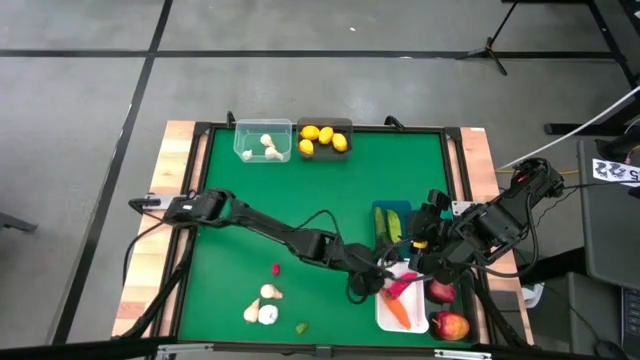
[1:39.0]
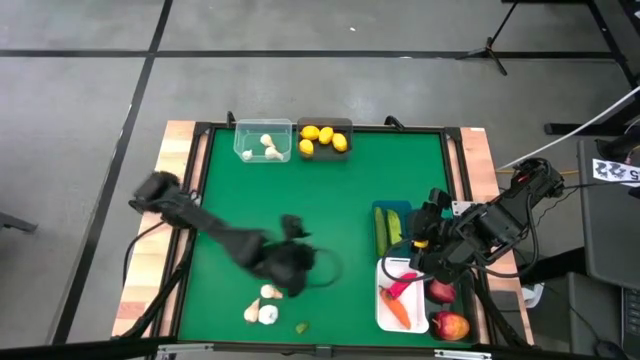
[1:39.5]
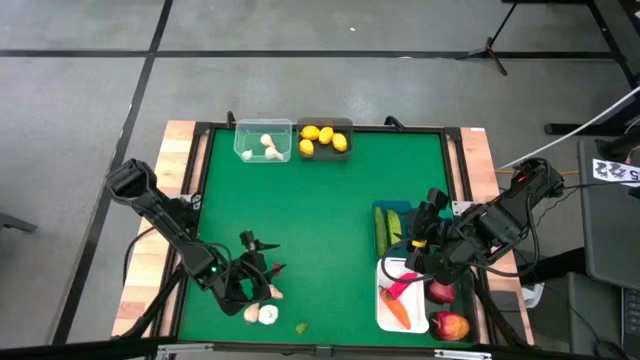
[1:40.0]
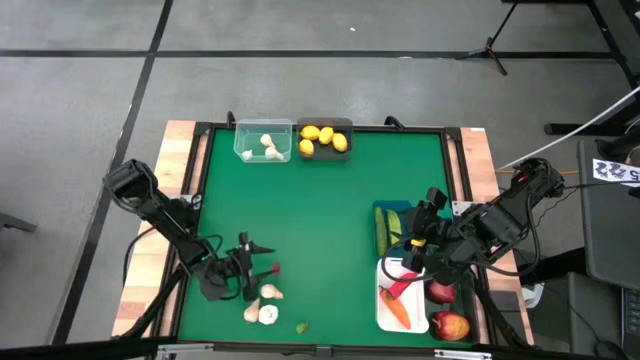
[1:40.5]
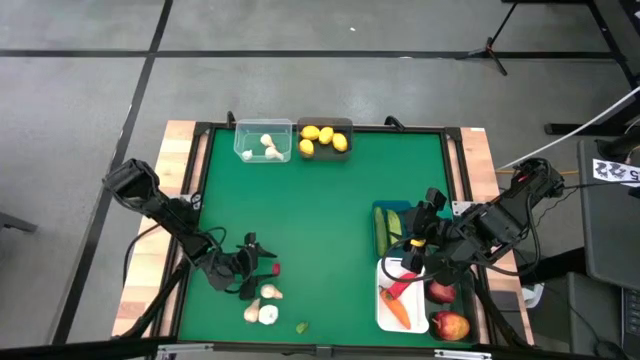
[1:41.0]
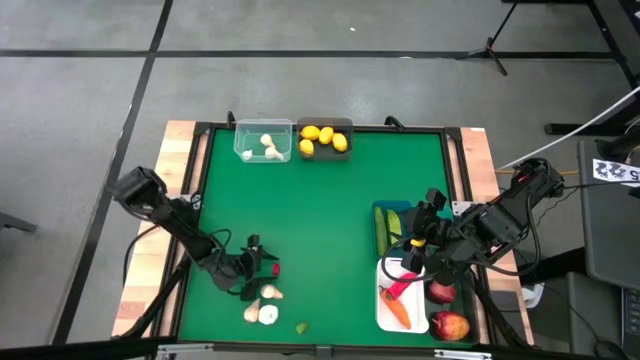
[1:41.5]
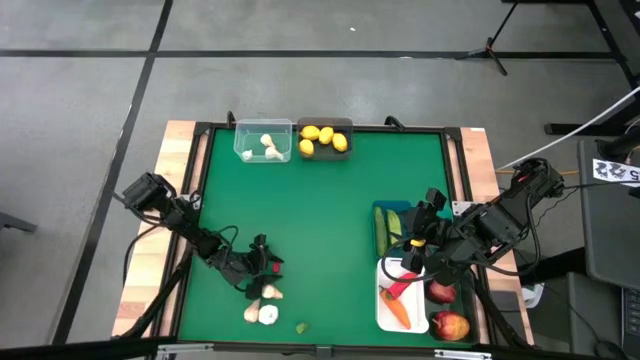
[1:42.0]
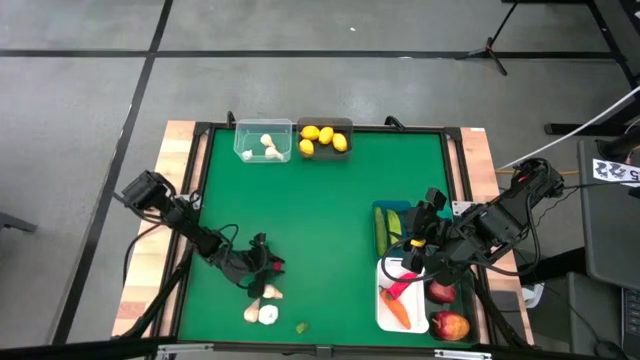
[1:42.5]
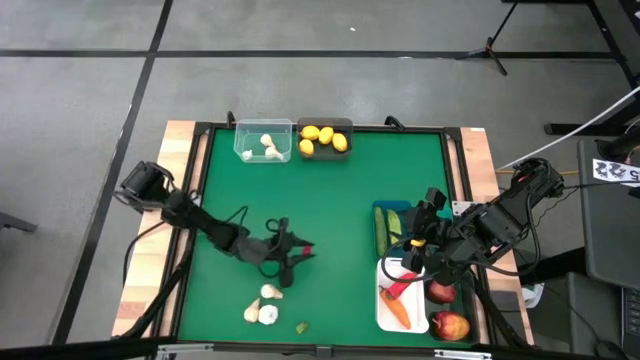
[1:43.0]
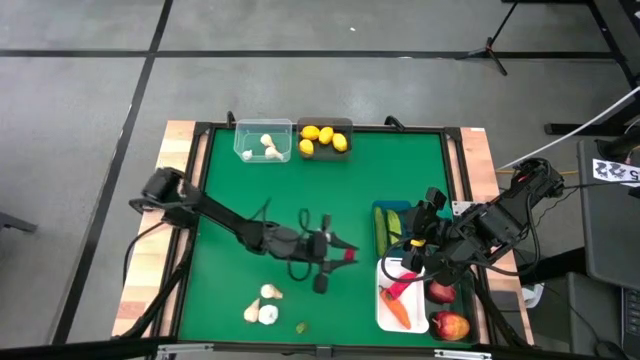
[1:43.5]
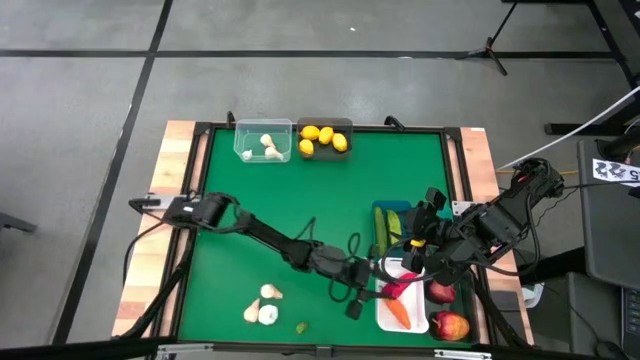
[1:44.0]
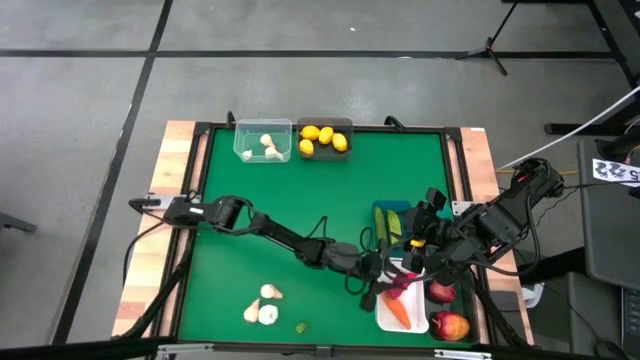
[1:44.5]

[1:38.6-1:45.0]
Task: Sort produce into baskets
Put the red chili pepper into the white bin

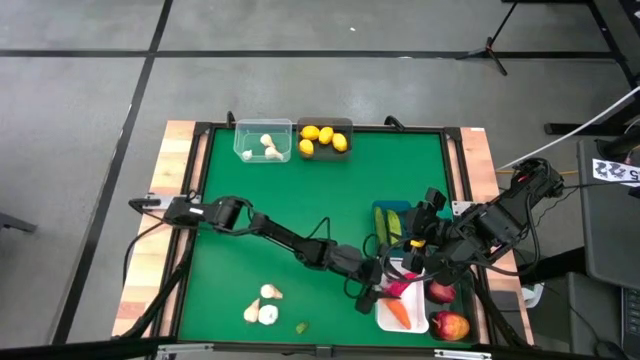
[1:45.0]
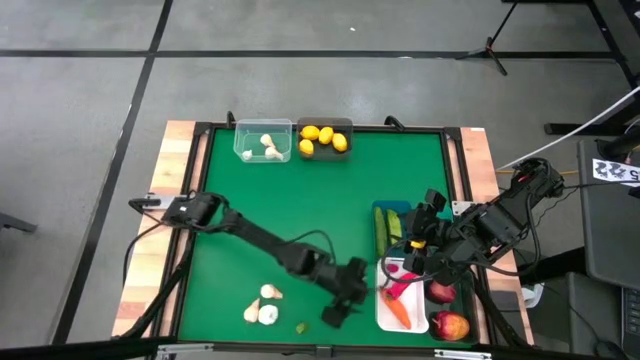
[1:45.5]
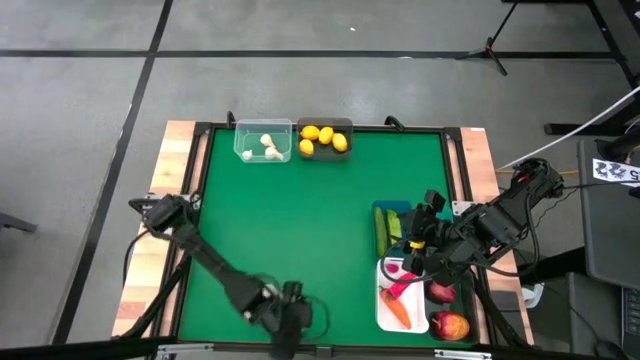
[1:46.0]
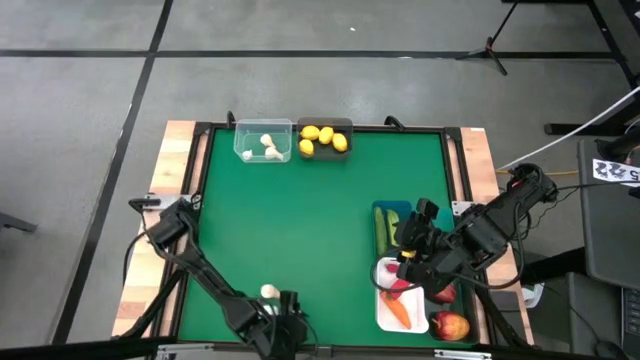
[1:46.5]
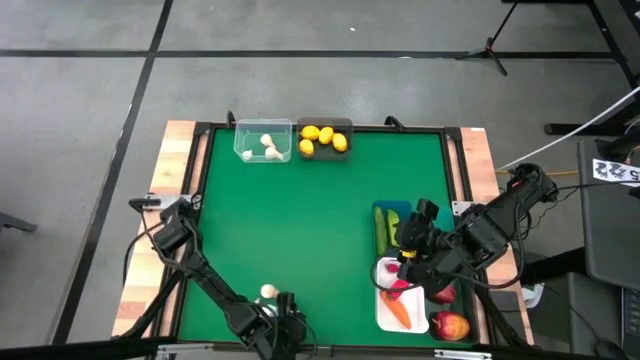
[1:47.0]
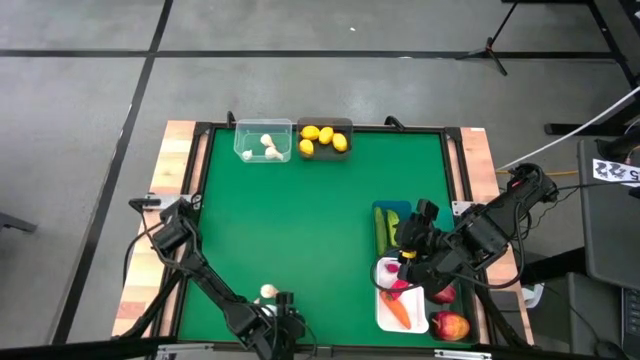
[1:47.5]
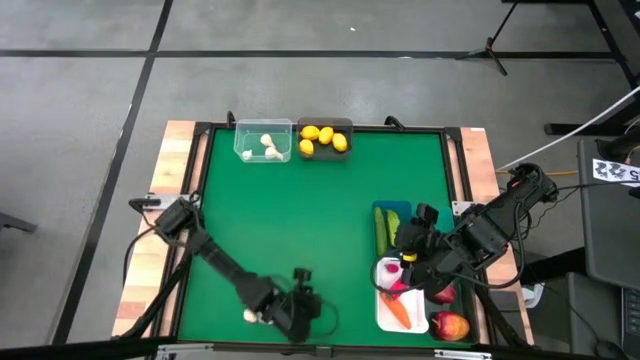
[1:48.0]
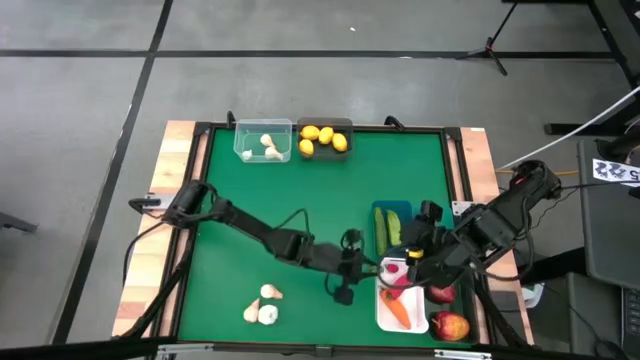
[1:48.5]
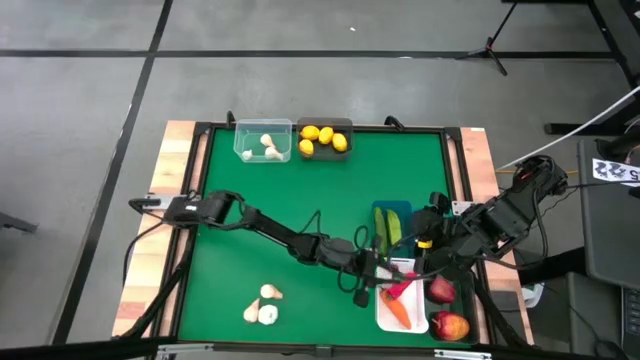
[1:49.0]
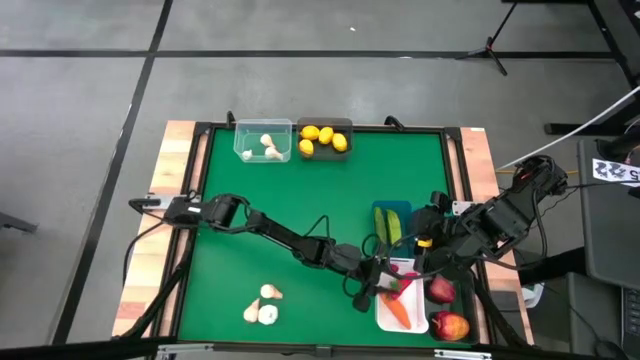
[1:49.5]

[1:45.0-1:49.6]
Put the green chili pepper into the white bin

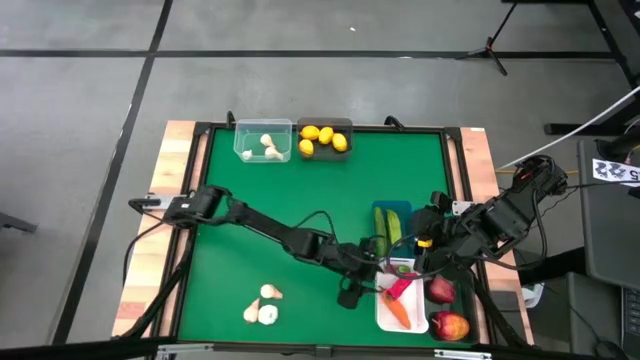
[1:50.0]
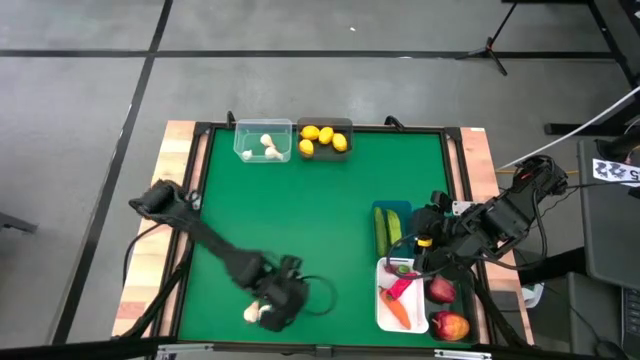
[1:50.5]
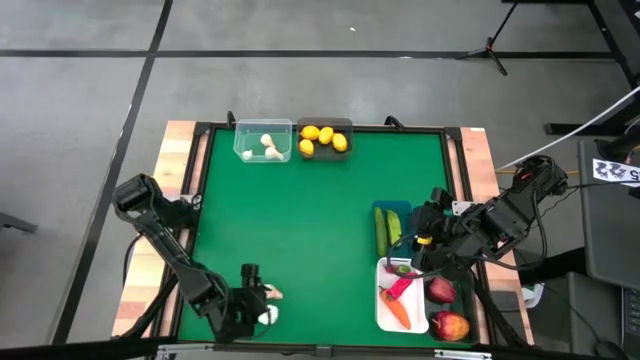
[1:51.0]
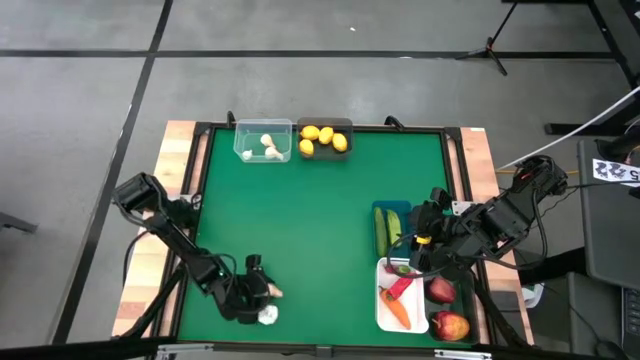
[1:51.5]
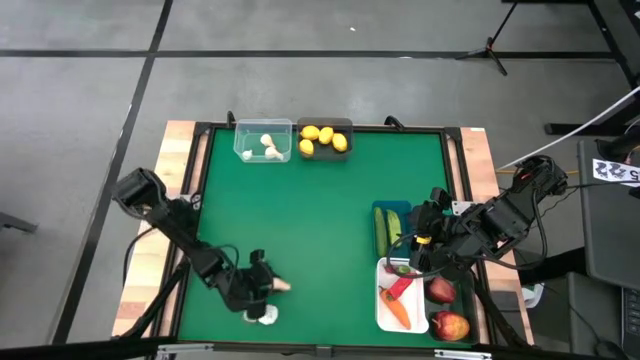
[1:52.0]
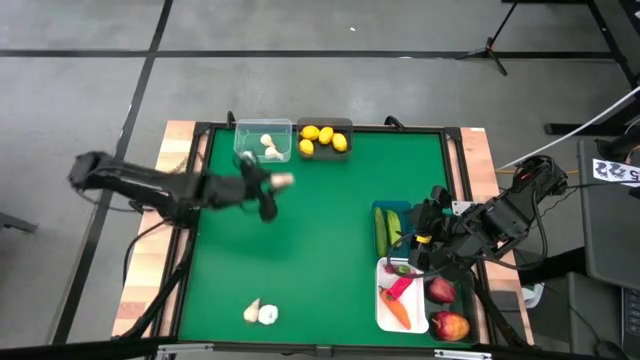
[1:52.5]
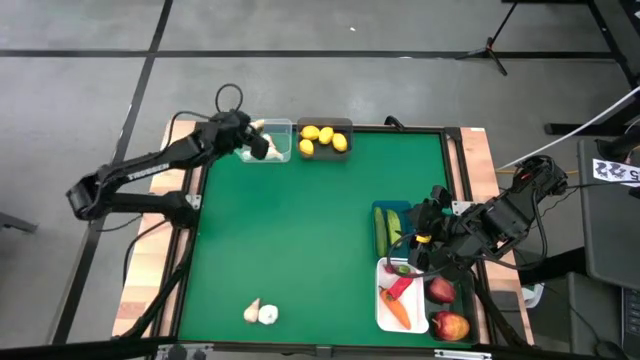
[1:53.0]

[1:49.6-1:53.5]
Put the white garlic into the transparent bin

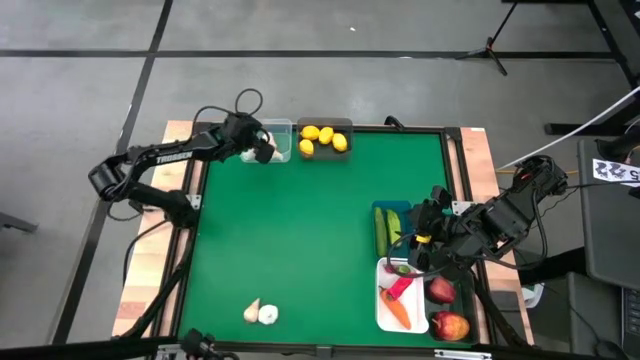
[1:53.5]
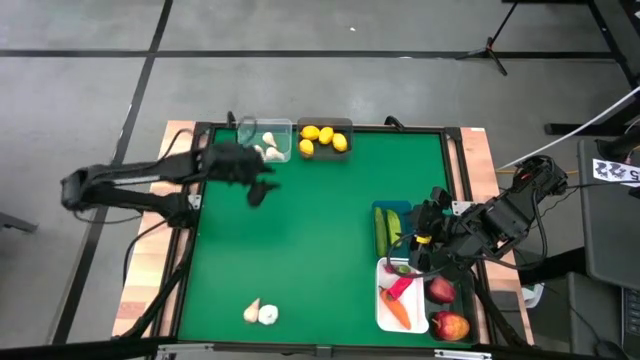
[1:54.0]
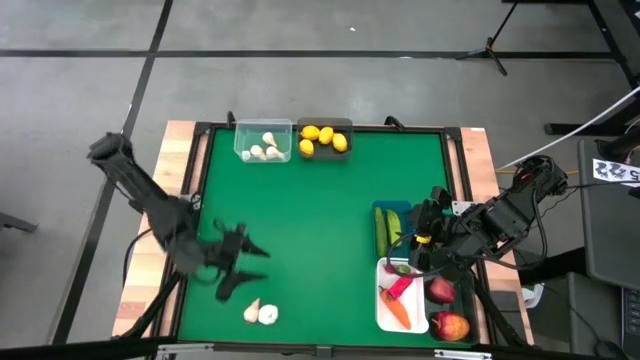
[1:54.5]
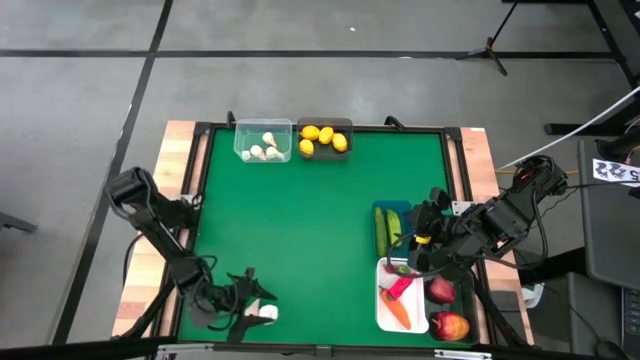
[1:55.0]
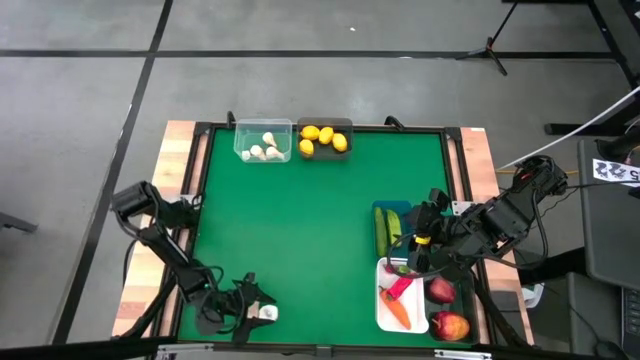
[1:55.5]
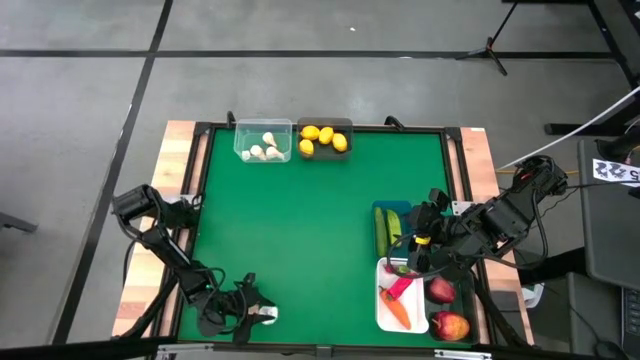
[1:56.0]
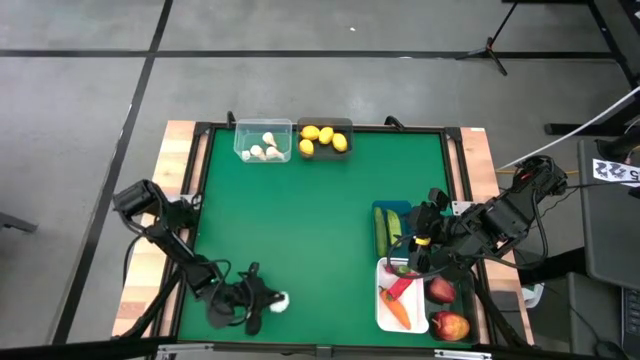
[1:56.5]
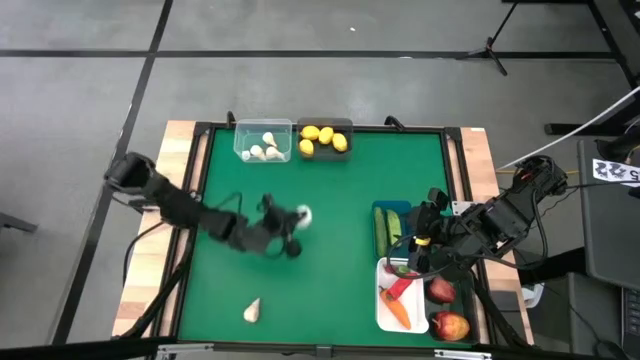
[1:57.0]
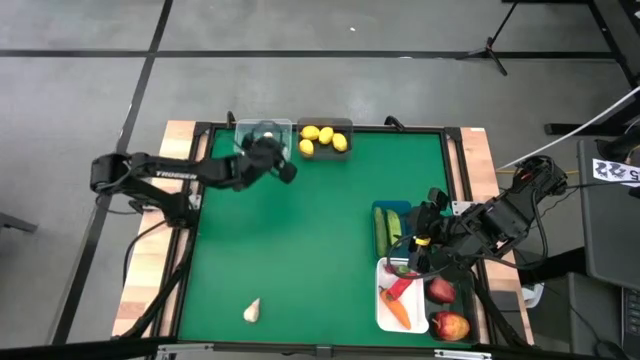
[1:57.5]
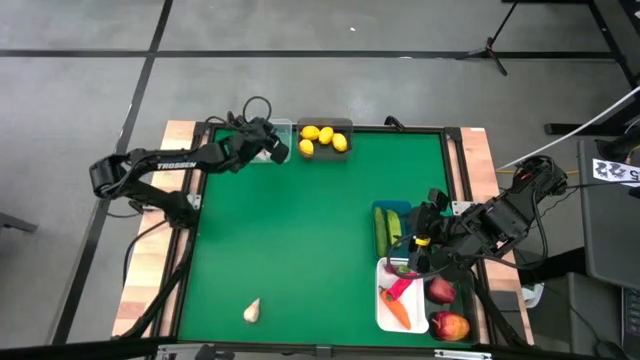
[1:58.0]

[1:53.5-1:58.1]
Put the white garlic into the transparent bin

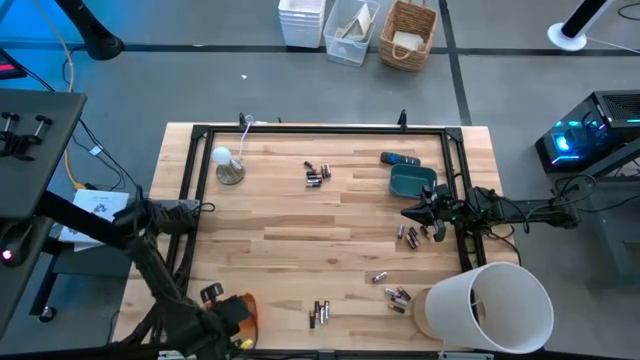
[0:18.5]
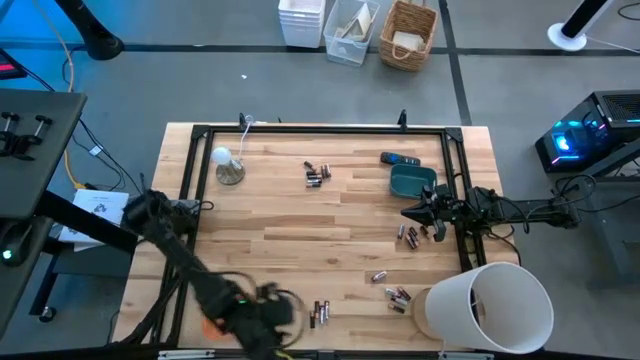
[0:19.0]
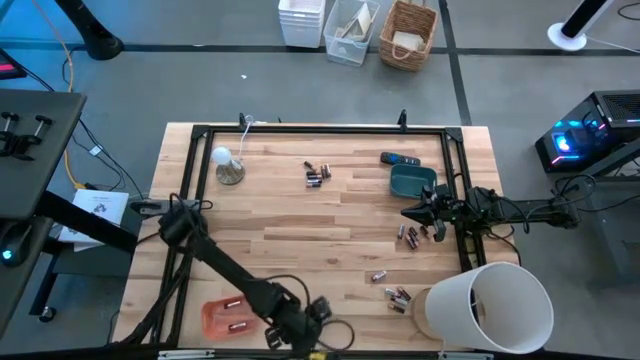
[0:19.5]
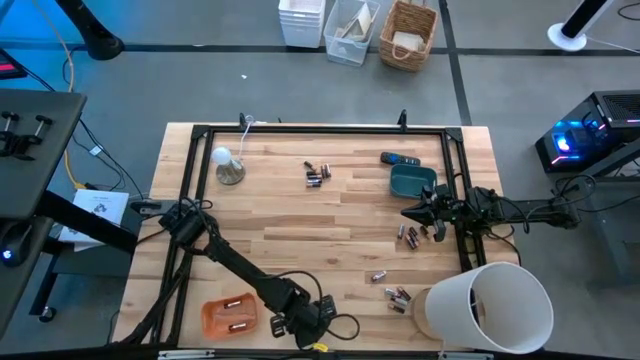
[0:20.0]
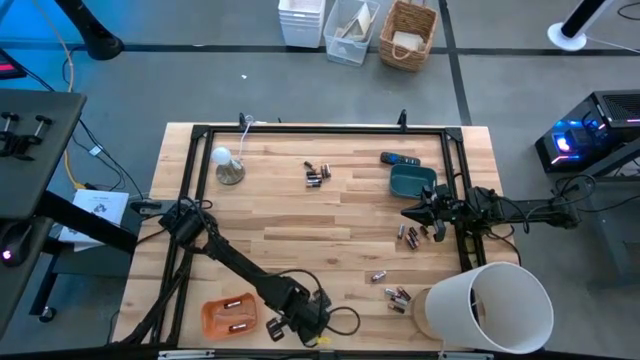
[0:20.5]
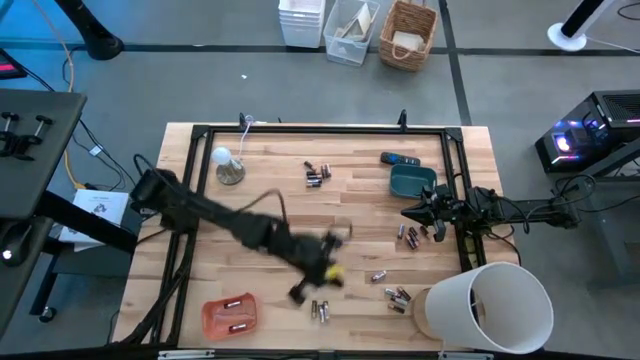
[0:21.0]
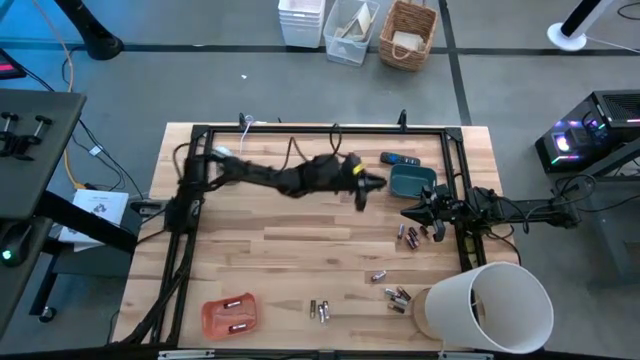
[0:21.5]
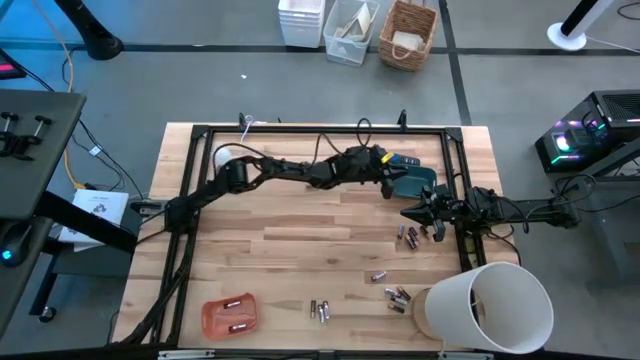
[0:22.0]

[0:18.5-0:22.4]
Task: Sort batteries
Put the black battery into the blue bin
